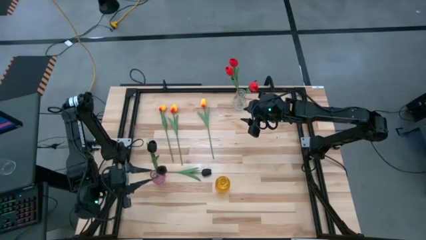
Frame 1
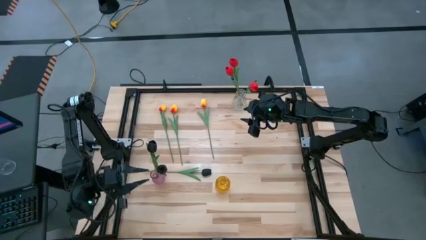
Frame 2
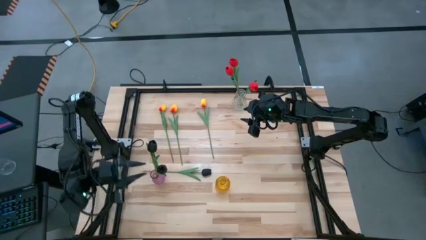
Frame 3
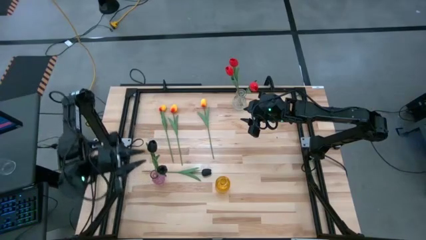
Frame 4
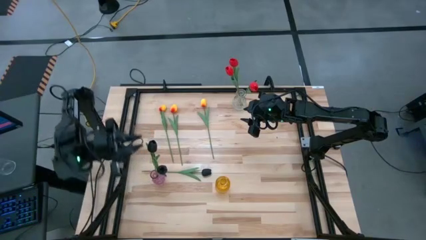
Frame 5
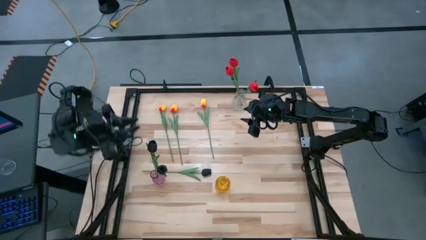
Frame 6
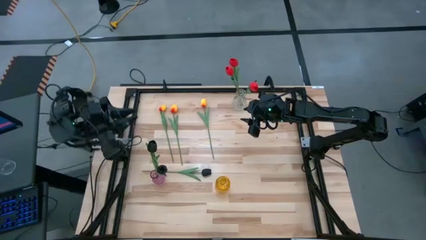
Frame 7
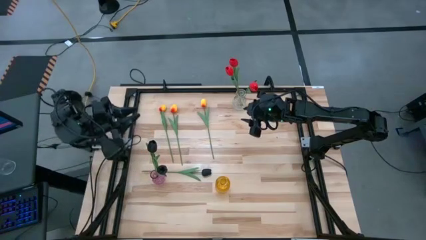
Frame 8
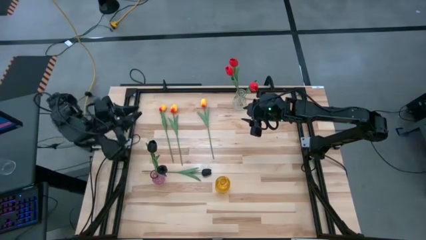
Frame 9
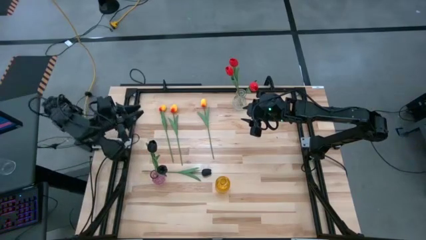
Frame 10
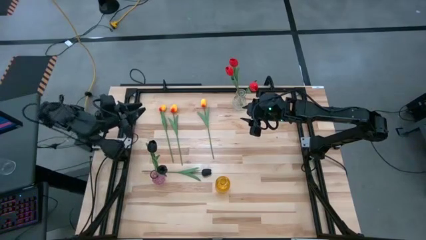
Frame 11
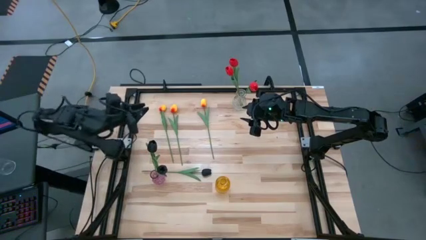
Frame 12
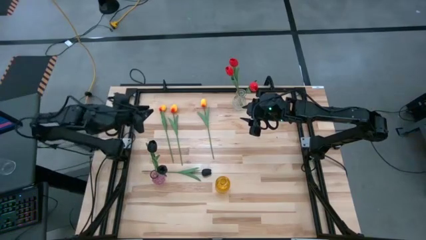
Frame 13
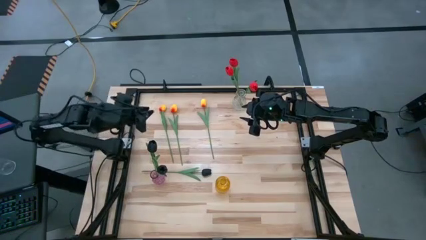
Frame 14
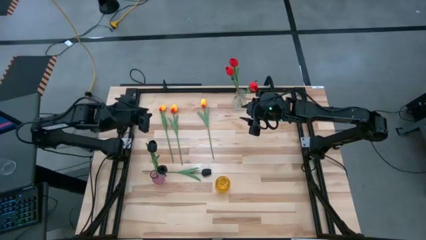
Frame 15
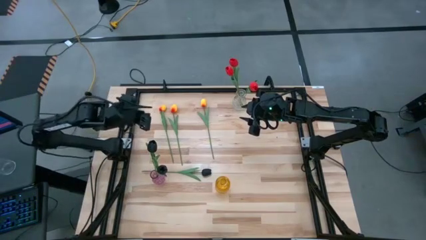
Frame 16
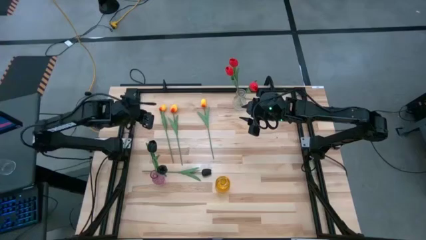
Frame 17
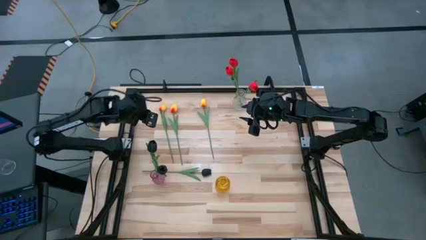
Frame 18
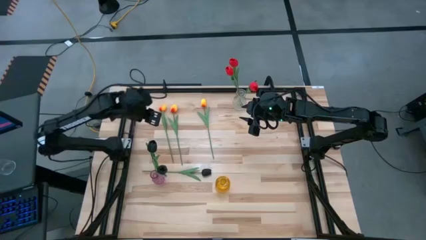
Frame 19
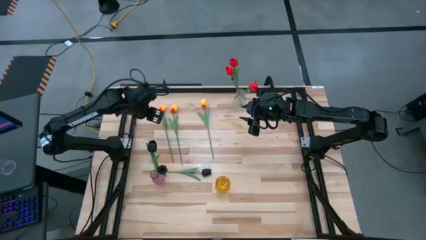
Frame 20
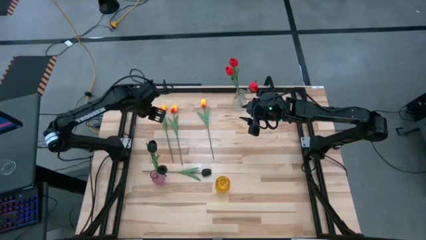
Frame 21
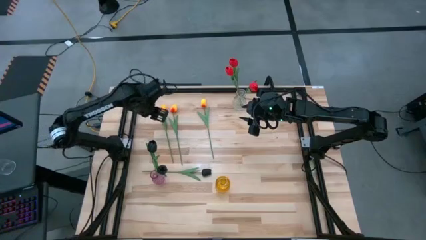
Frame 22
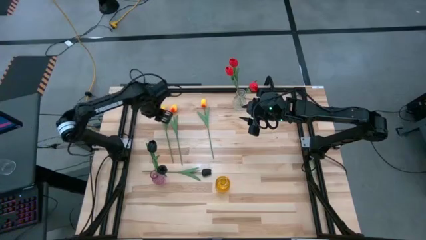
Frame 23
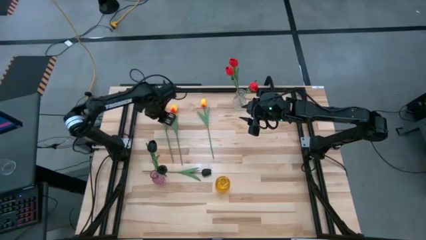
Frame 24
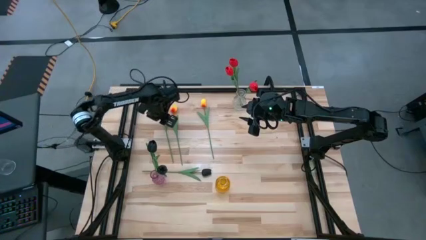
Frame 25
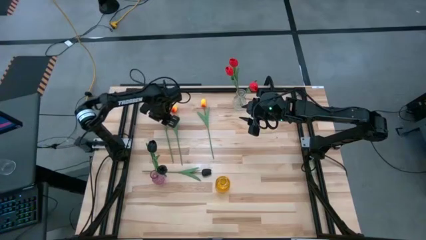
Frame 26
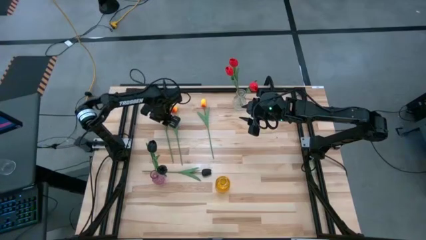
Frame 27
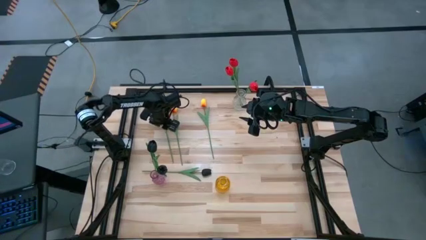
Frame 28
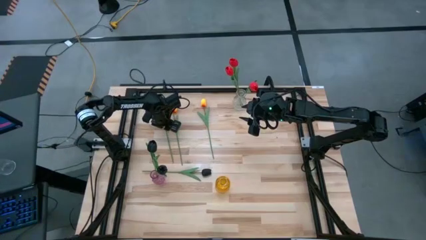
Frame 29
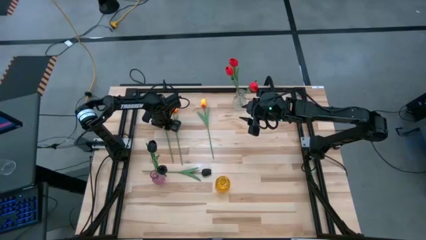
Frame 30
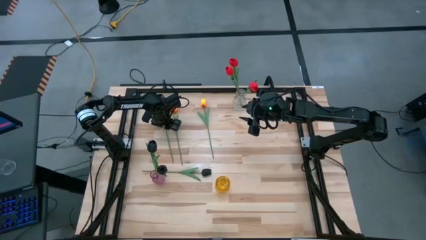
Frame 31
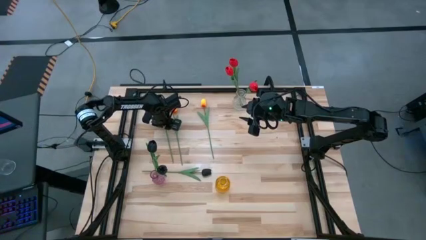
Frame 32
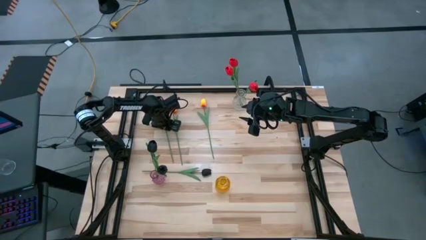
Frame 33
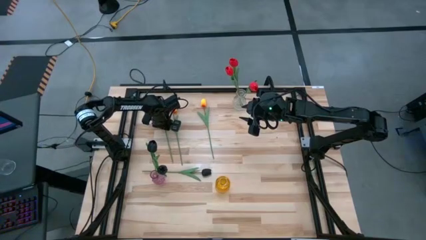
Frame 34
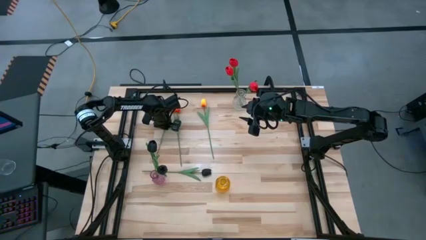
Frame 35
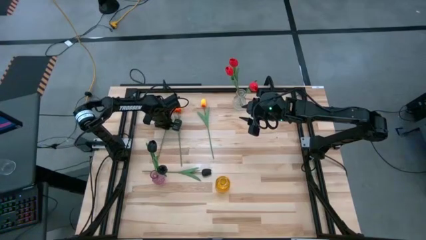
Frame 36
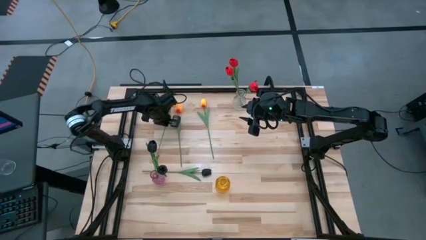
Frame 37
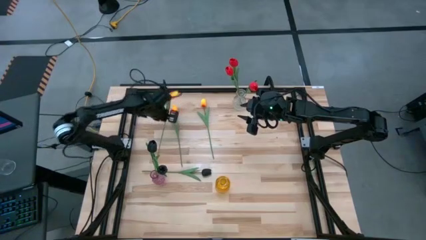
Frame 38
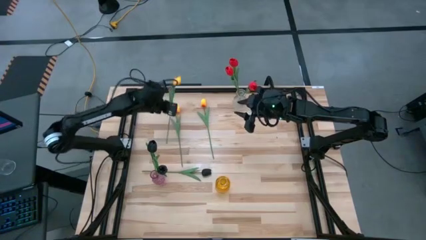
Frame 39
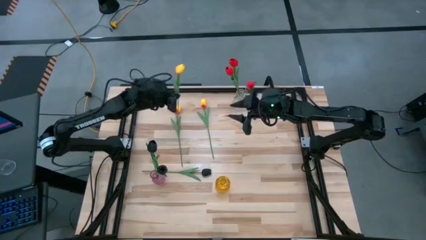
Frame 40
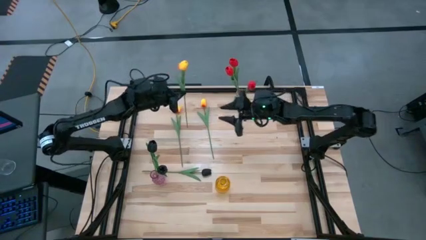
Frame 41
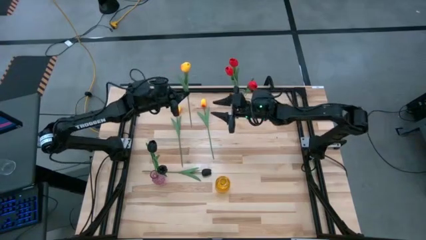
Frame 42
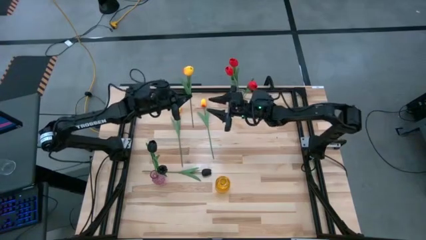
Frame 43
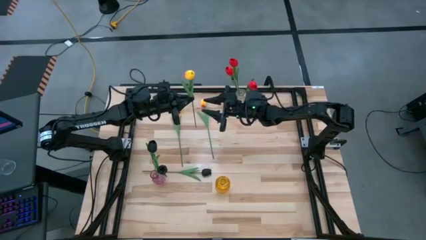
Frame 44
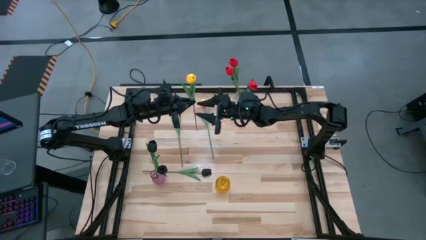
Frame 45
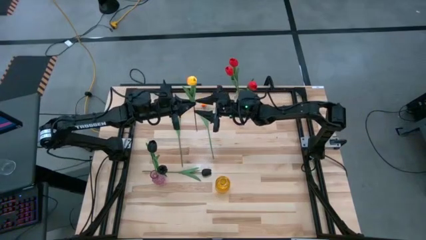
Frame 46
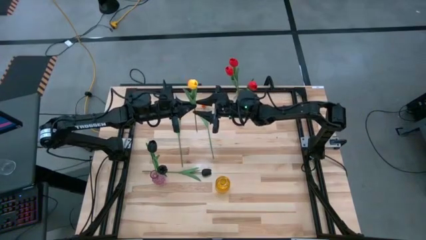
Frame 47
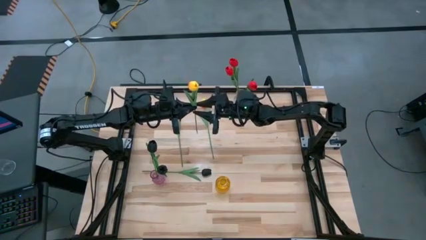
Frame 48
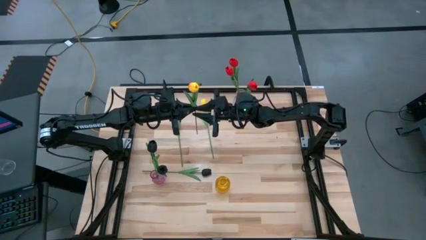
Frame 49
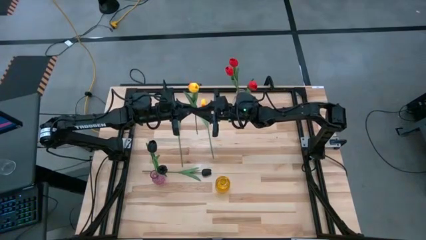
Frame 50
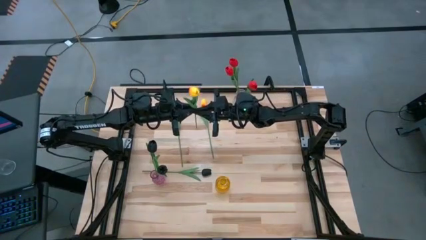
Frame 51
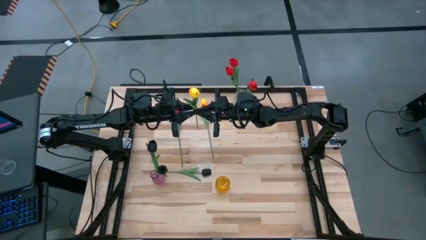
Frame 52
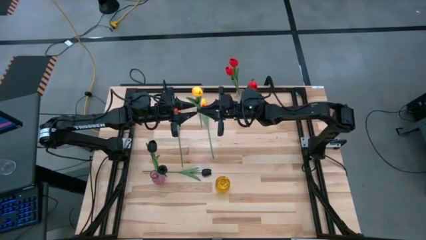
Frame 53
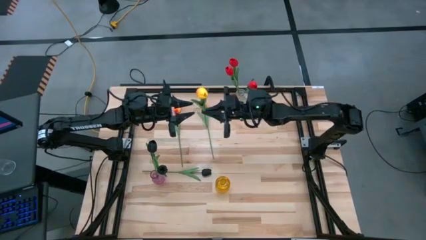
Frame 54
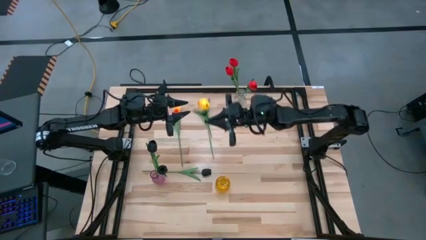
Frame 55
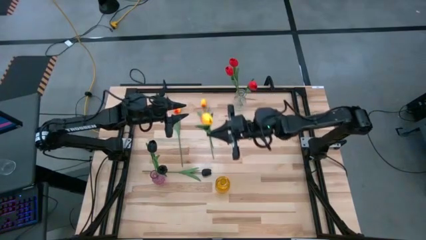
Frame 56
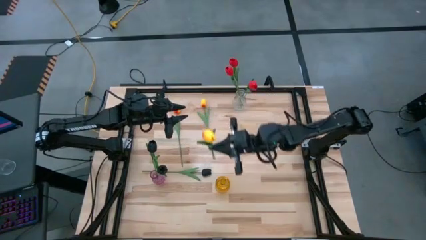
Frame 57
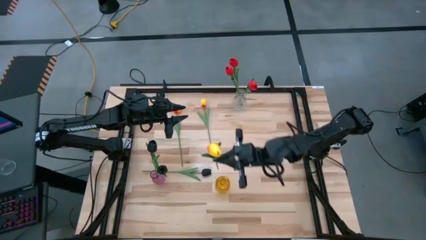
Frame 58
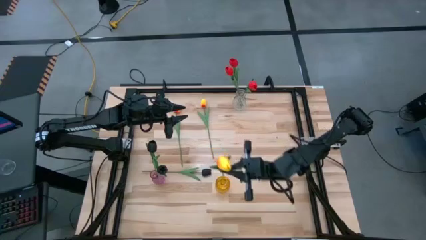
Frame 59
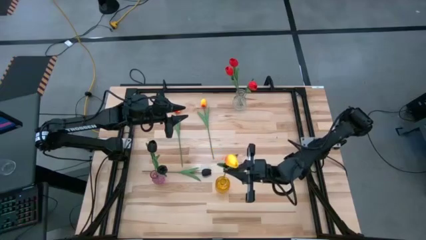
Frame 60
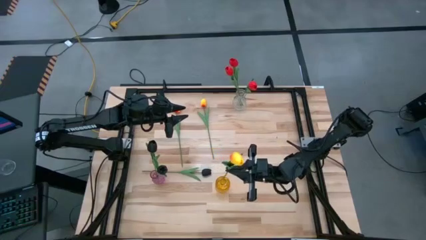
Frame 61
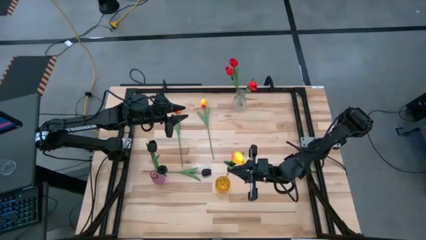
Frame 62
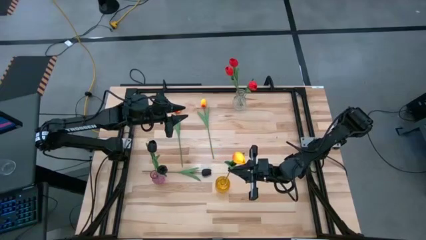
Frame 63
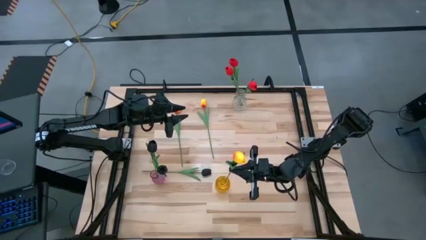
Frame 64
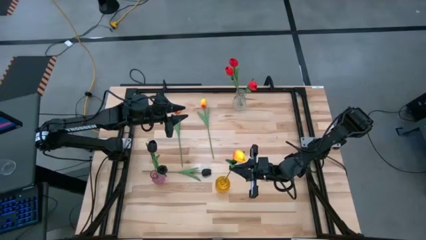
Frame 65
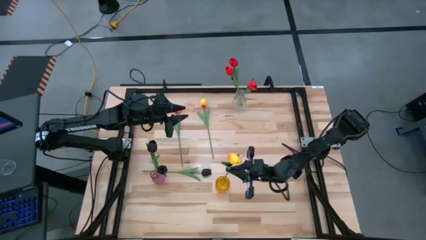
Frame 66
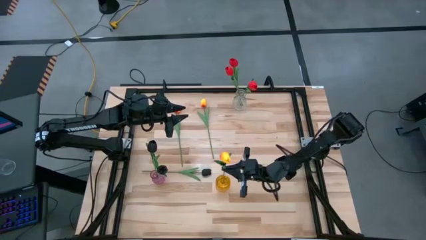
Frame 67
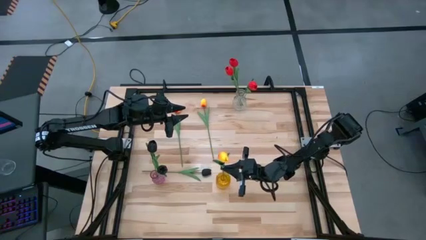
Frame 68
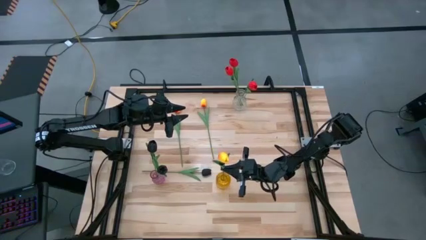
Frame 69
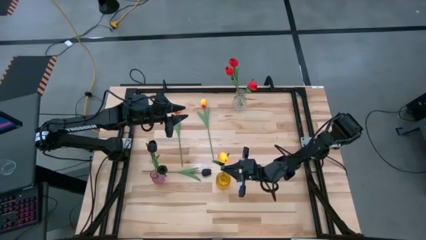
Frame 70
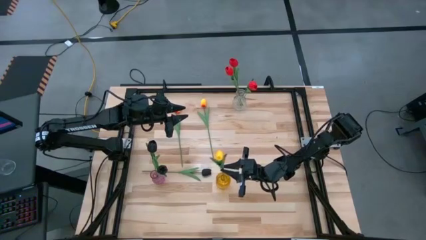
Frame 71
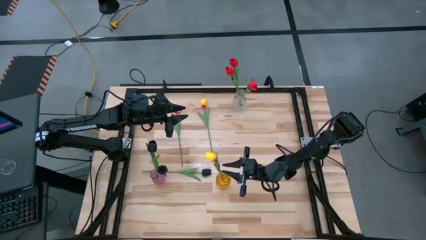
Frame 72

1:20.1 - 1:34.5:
Task: Sort flowers into vase by color
Put the left yellow flower into the yellow vase

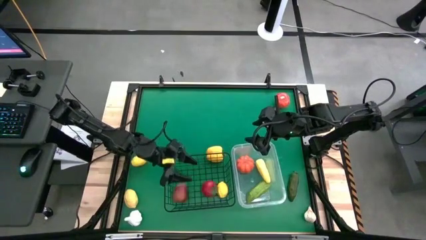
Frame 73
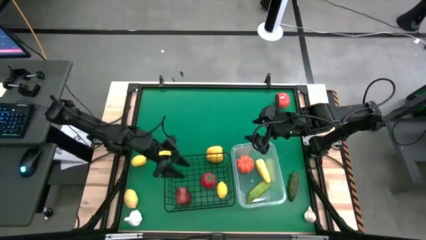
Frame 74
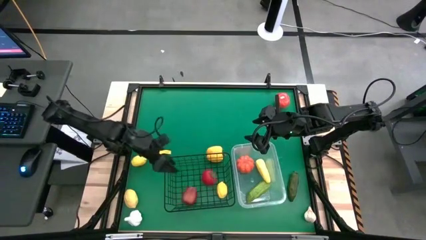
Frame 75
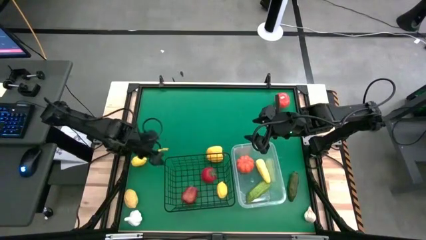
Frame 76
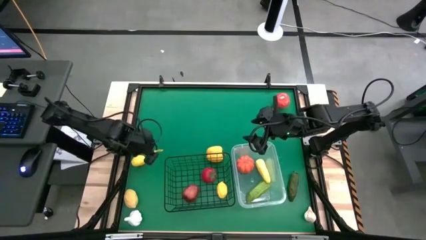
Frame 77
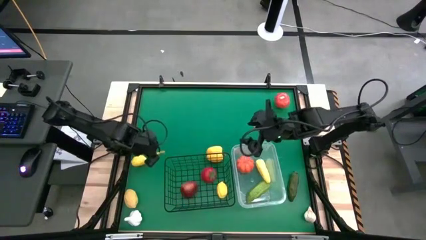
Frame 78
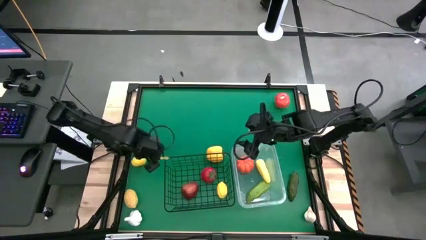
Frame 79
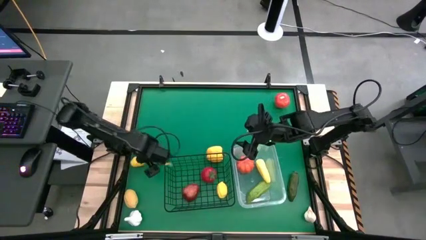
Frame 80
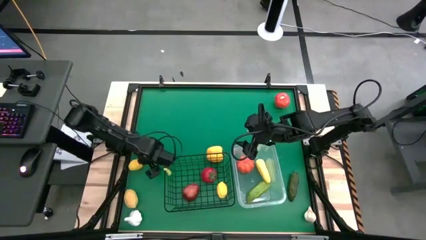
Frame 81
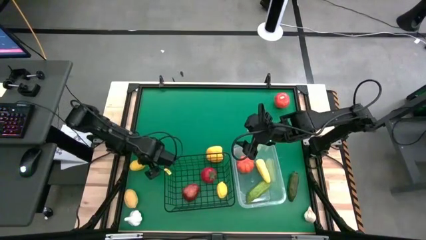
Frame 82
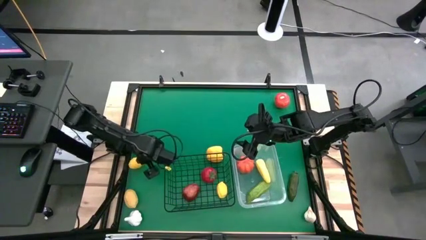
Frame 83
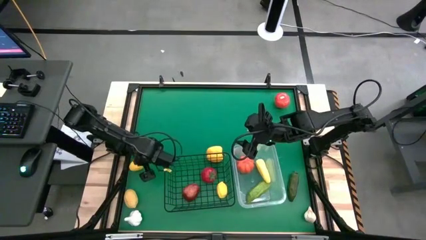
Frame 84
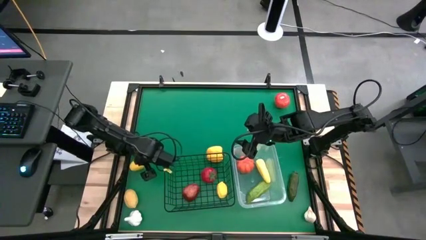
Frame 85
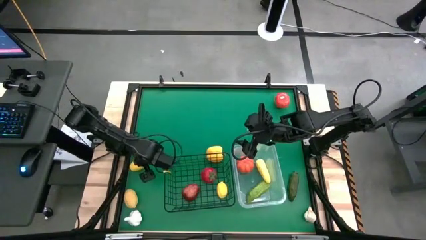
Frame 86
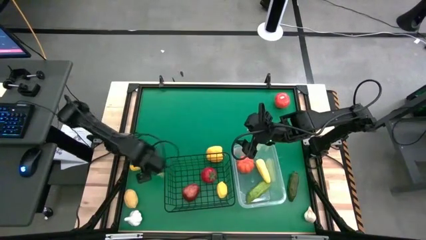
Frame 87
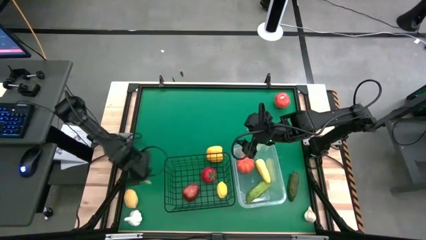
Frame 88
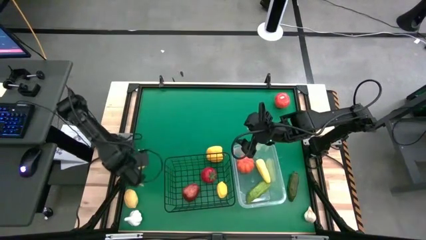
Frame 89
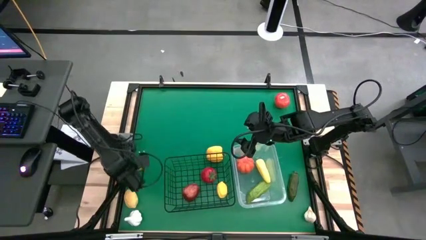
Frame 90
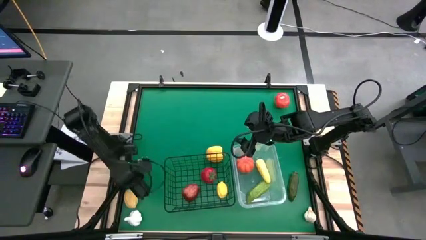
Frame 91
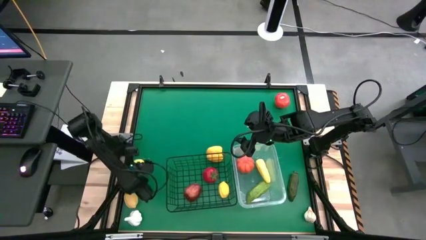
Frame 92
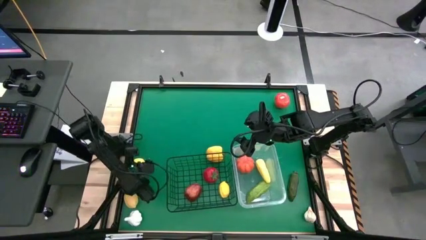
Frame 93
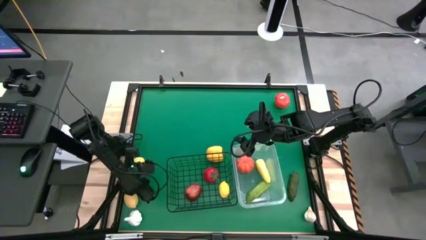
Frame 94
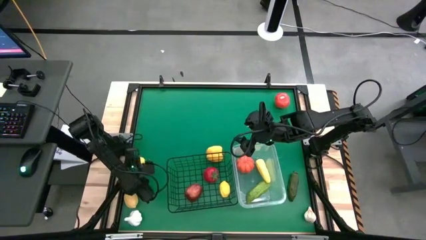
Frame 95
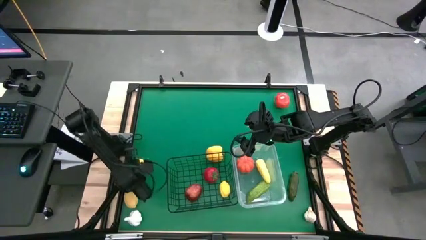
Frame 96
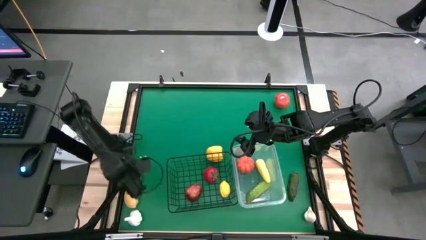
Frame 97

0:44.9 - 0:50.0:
Task: Sort produce into baskets
Put the top lemon into the wire basket
